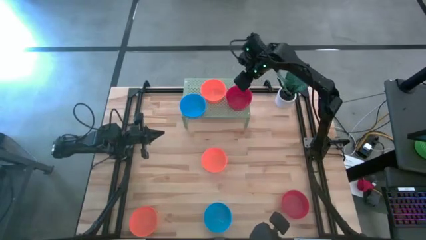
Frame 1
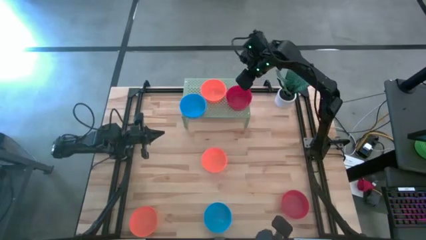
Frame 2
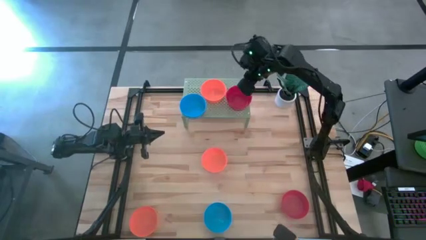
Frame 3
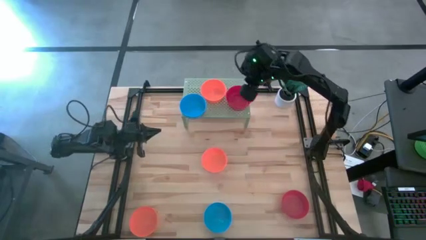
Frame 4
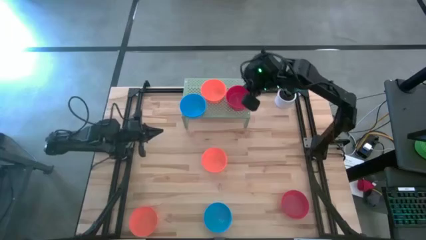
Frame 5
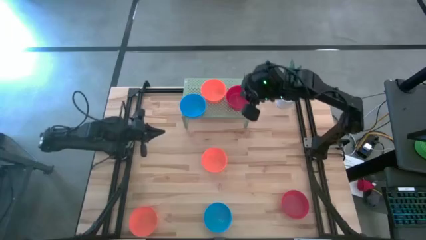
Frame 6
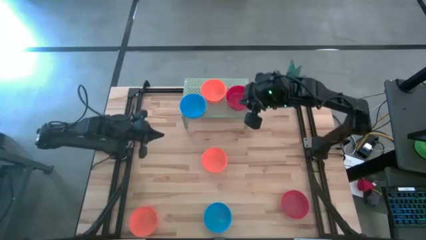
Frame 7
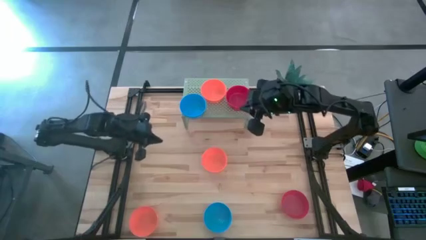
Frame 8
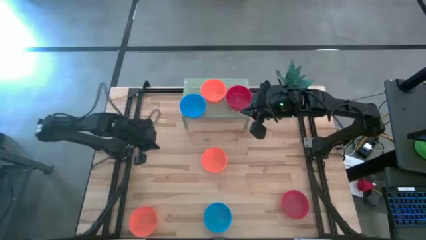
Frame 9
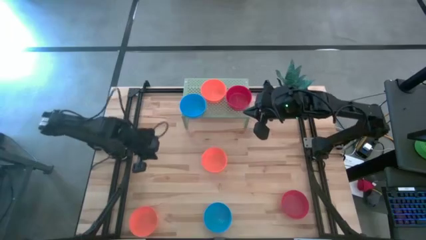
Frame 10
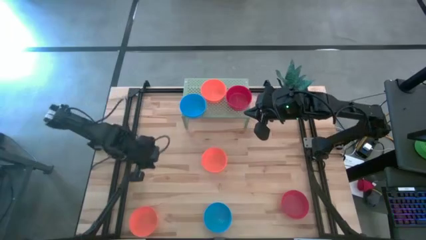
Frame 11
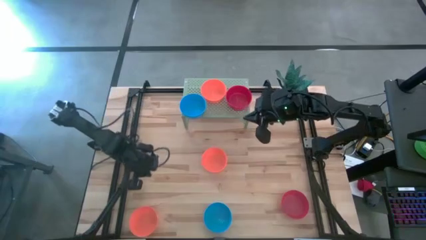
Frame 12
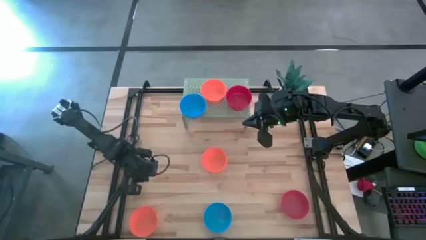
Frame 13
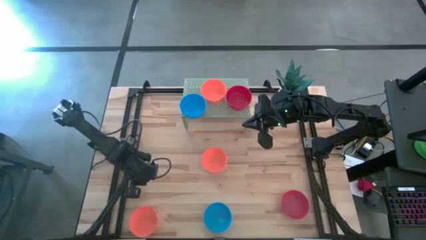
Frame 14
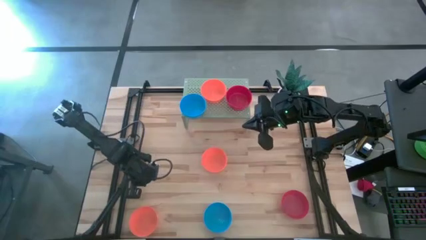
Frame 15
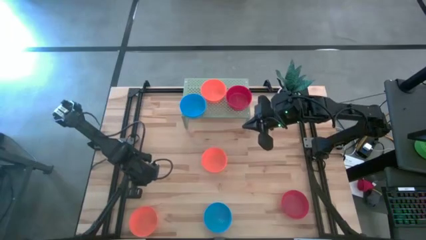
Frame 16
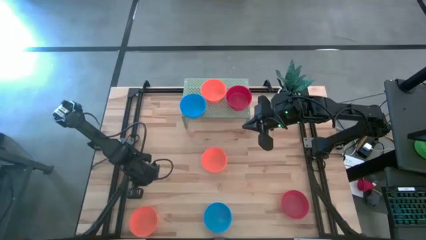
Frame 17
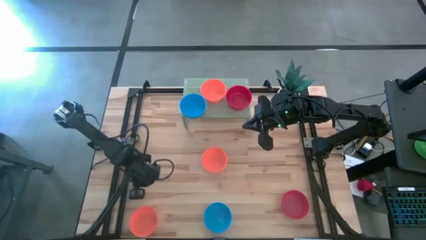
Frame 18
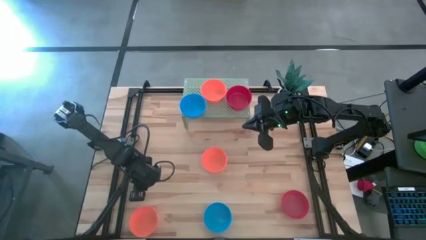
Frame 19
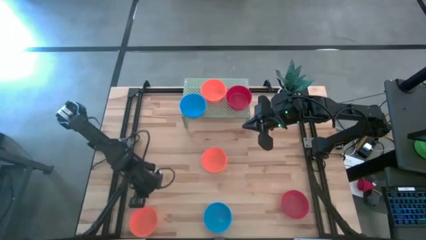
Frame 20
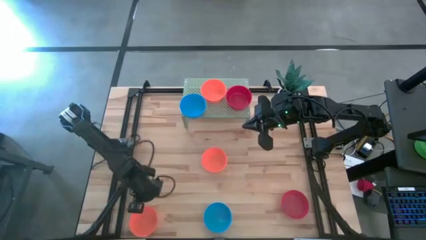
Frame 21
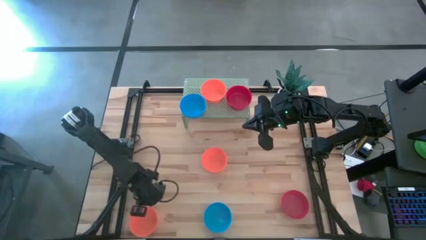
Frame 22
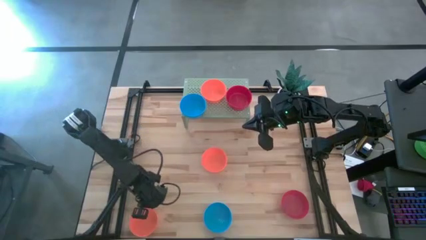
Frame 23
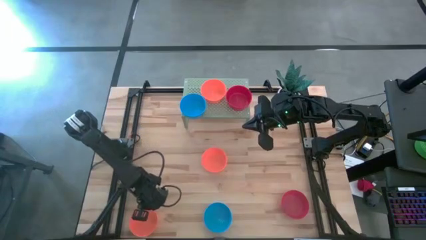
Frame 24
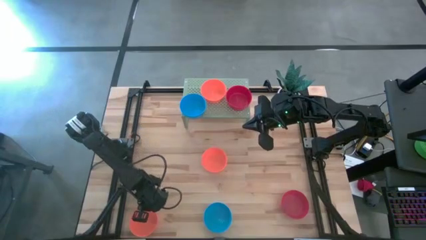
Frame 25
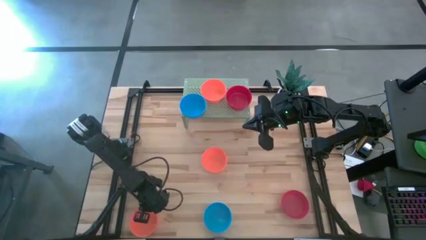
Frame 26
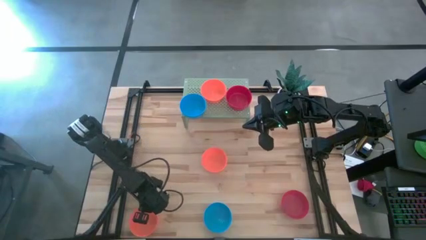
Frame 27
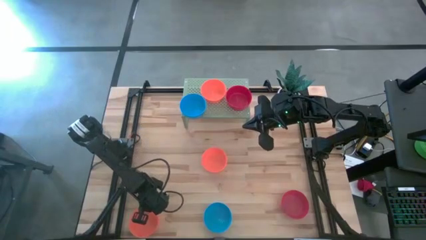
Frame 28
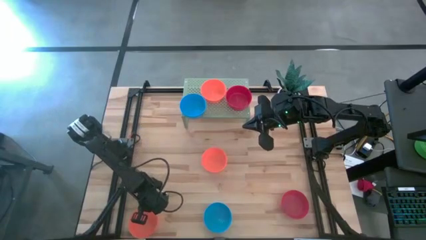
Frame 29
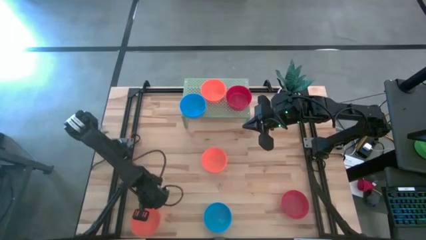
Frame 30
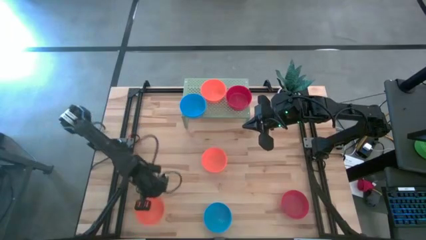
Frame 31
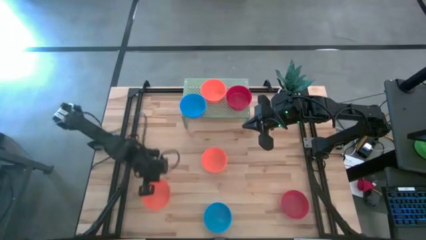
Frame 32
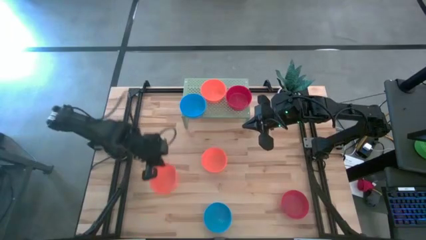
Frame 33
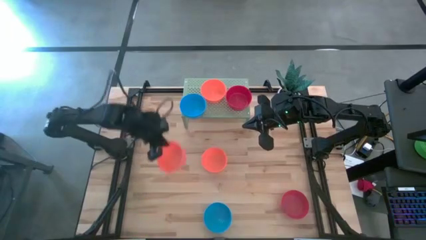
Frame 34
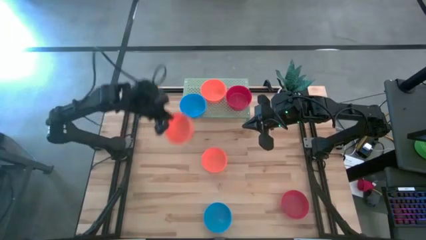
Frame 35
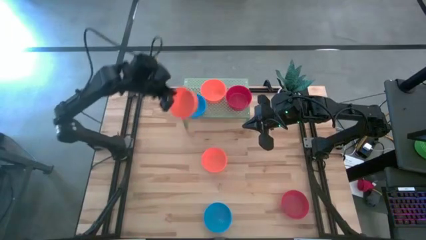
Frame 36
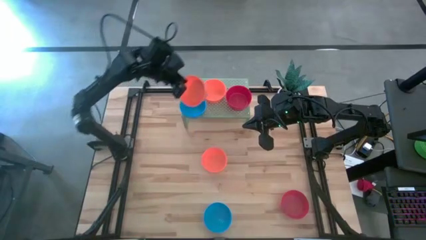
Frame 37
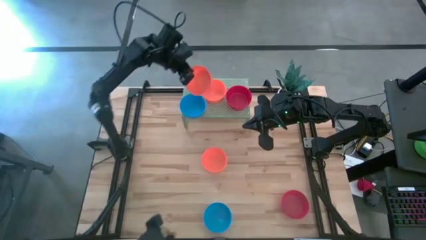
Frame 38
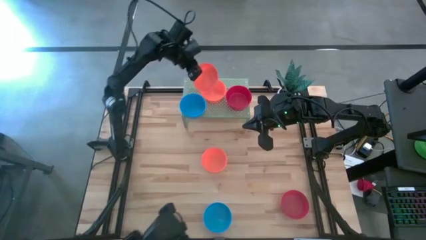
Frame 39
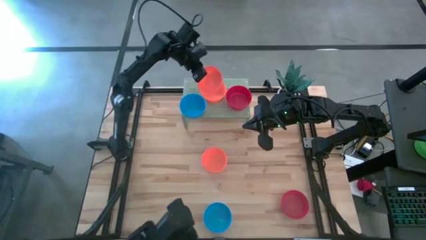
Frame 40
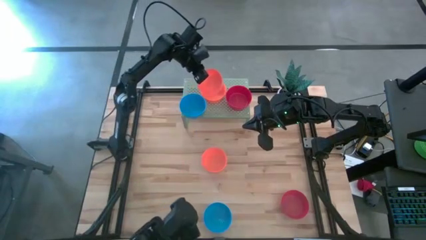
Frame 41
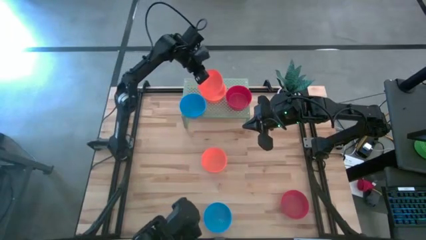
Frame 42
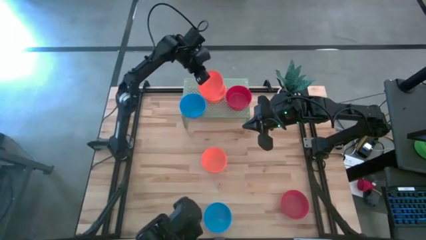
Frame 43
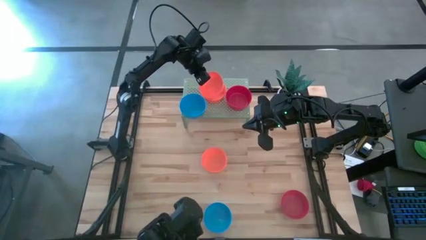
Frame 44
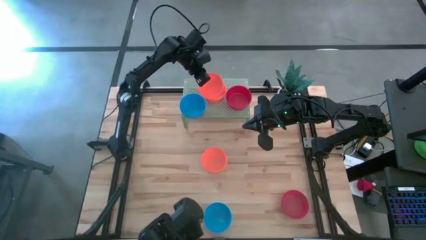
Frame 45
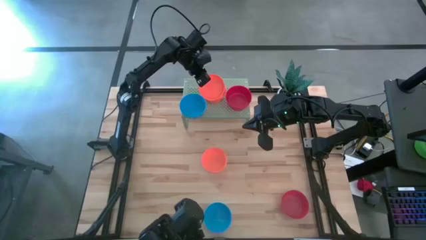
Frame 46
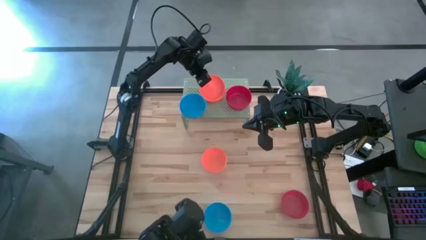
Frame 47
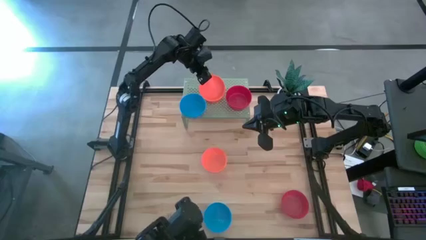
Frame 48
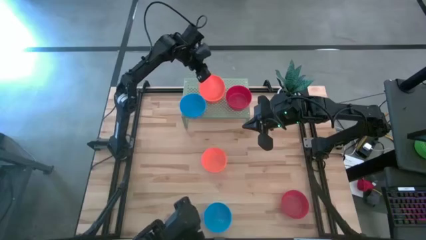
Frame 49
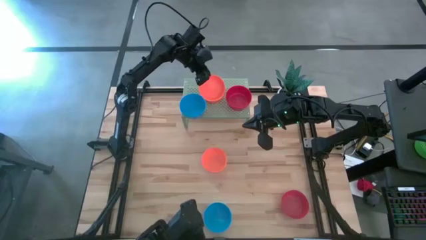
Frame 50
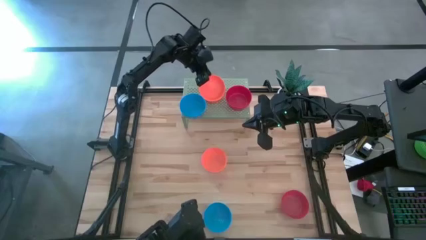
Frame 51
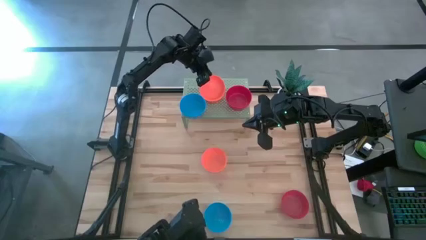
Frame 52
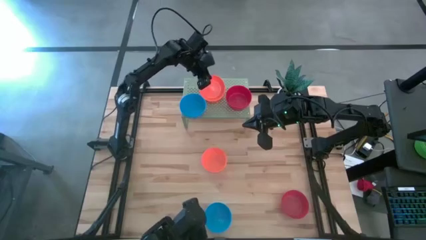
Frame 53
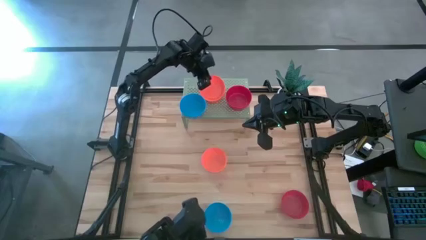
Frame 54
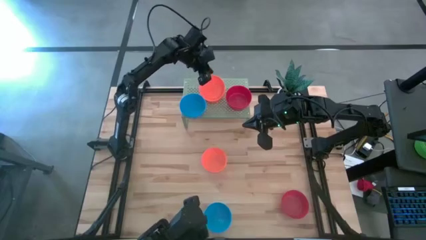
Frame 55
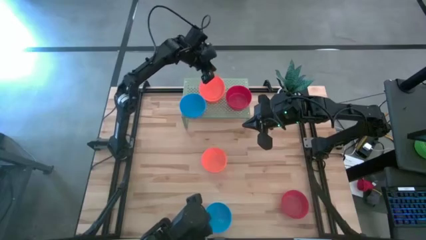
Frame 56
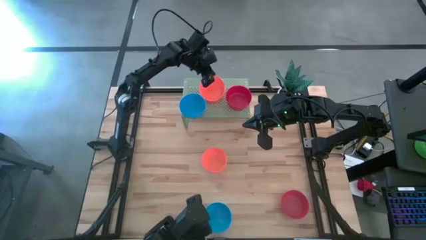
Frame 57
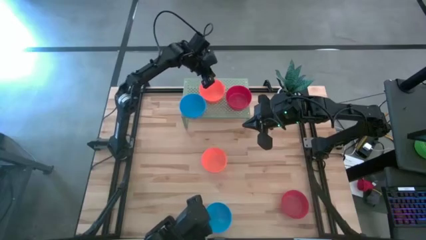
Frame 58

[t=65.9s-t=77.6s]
Task: Pick & Place Mini bowls
Stack the bottom orange bowl on the orange bowl on the shelf

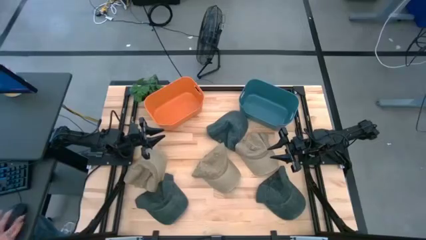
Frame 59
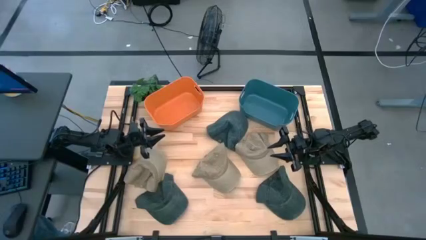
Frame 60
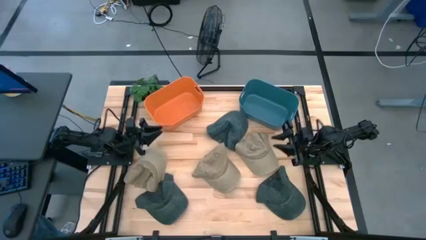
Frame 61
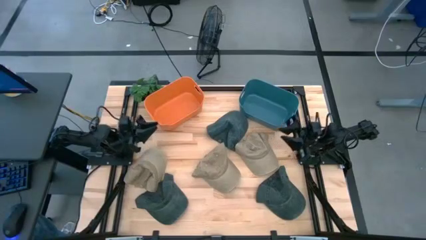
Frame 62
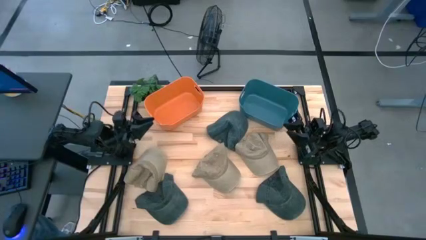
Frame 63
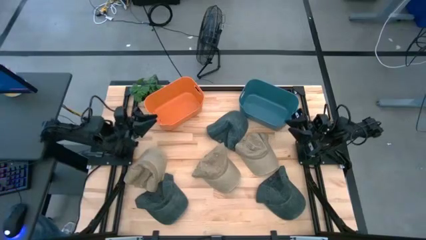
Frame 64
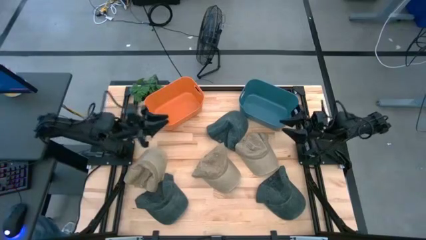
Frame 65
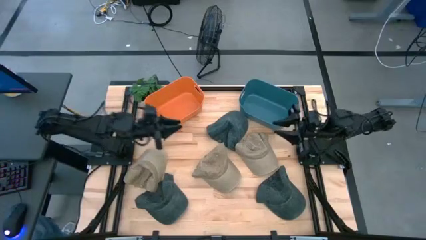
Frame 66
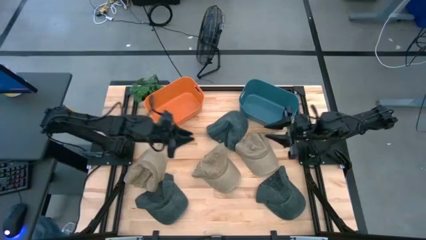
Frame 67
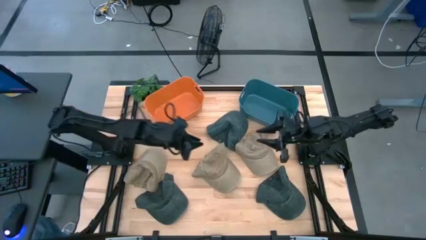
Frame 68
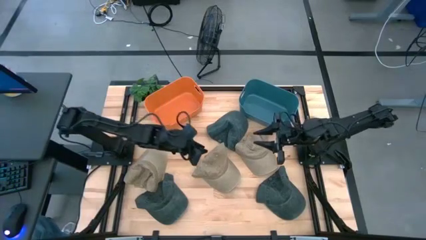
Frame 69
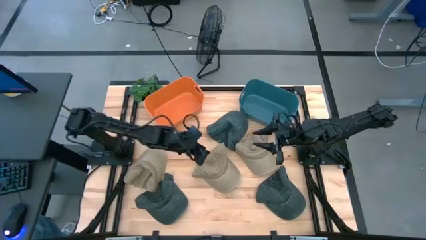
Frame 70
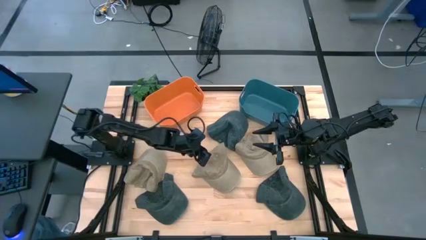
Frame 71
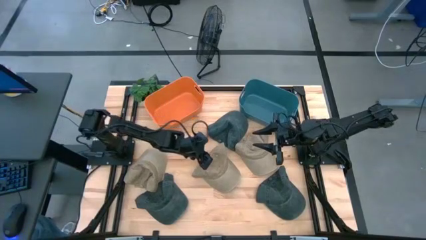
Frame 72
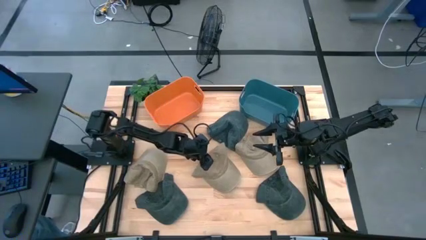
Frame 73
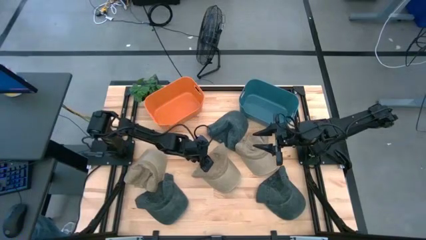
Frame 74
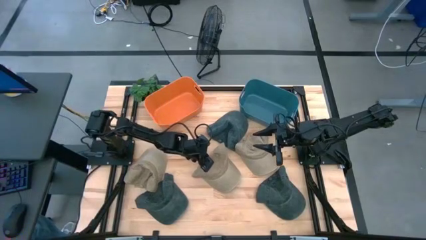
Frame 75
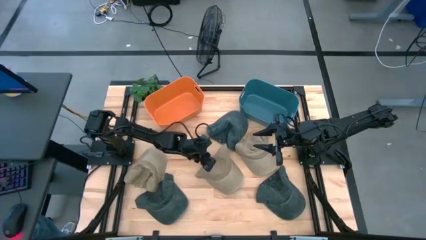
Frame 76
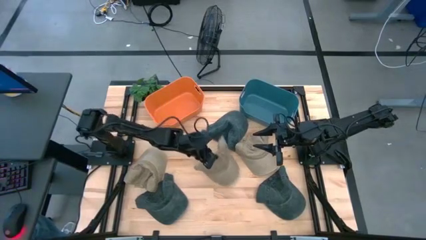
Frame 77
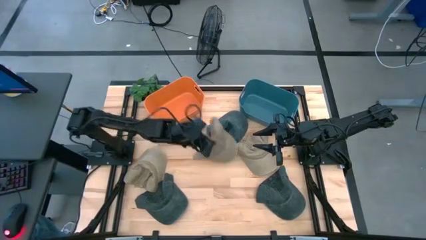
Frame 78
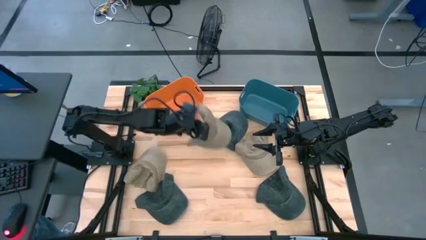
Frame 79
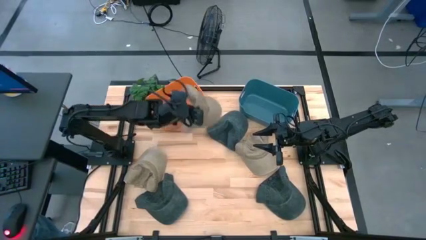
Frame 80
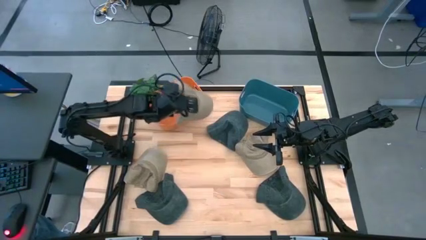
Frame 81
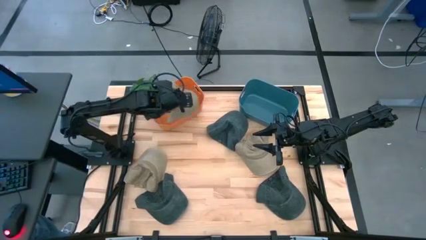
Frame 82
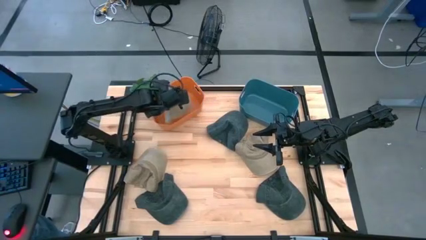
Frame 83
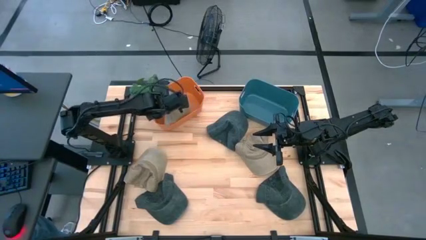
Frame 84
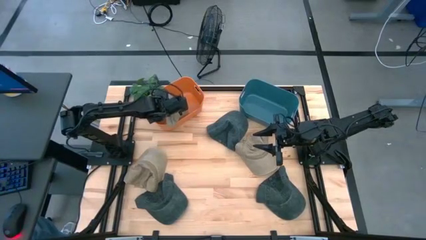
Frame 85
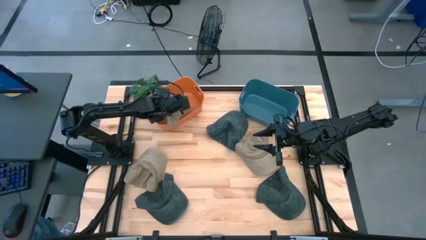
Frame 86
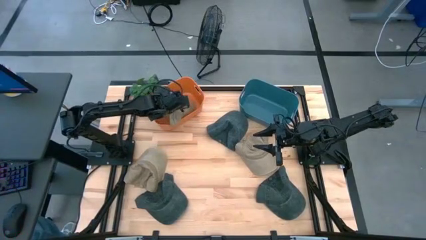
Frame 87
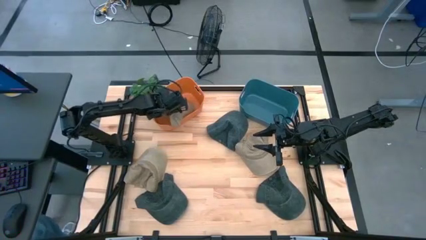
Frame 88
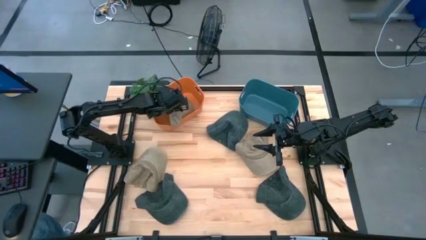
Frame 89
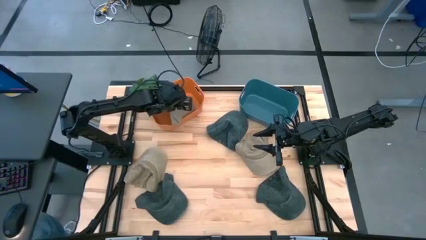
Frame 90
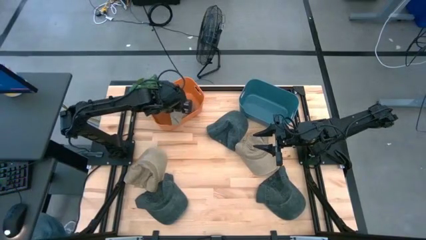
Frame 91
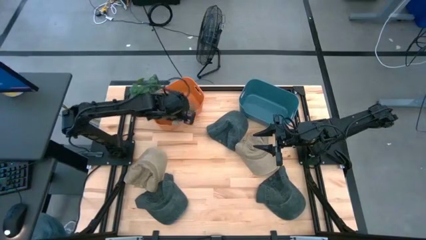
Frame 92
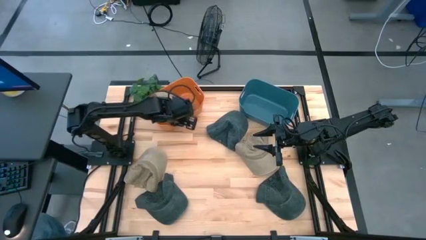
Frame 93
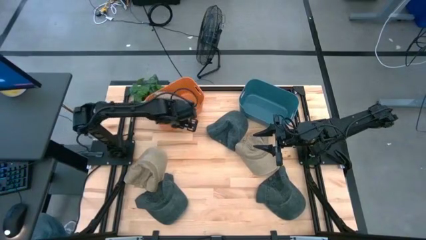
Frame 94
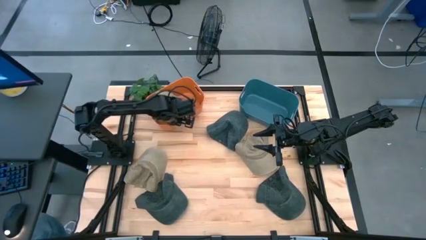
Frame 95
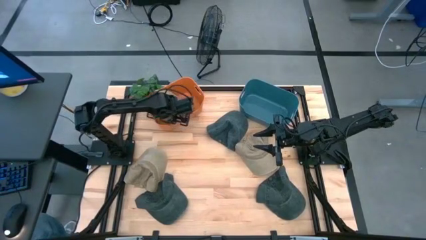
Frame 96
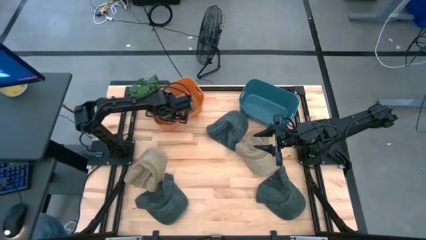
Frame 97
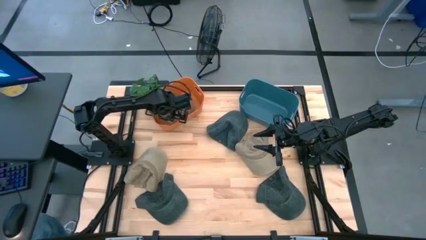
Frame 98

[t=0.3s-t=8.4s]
Task: Pick & Place hat
Put the middle brown cap into the orange bin
